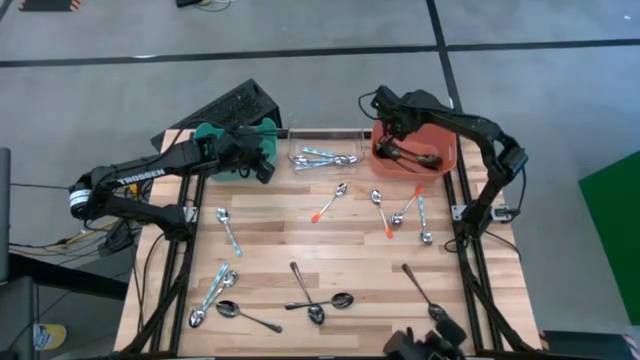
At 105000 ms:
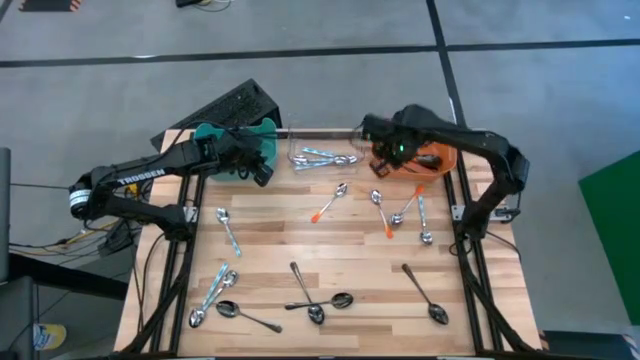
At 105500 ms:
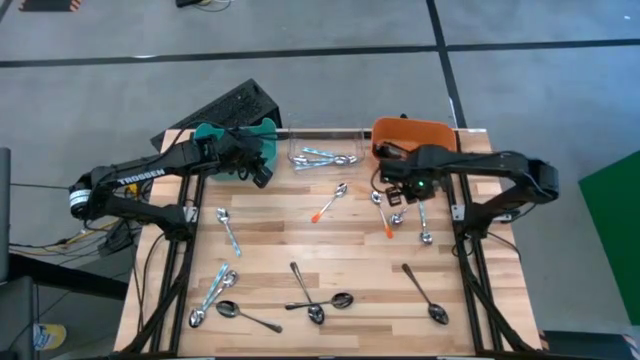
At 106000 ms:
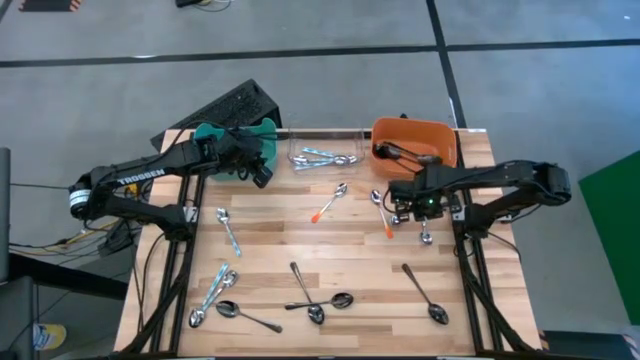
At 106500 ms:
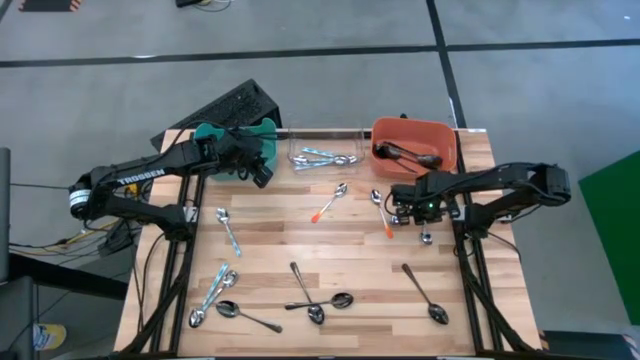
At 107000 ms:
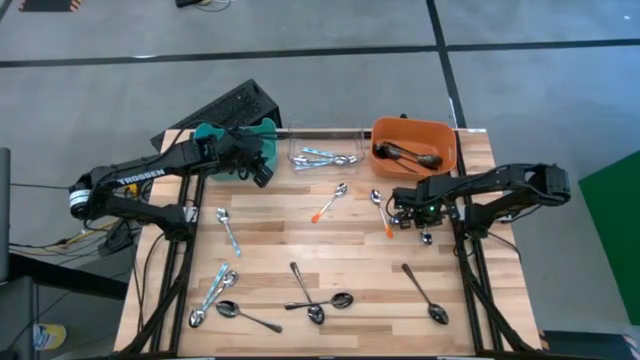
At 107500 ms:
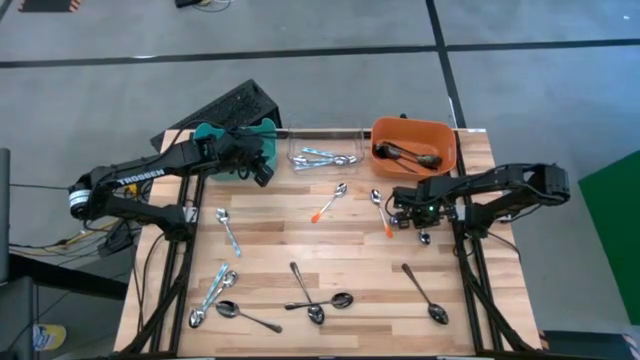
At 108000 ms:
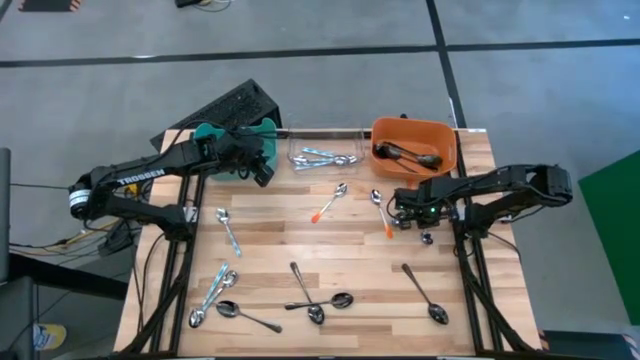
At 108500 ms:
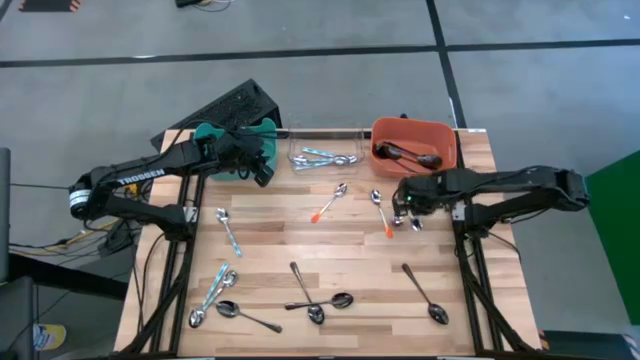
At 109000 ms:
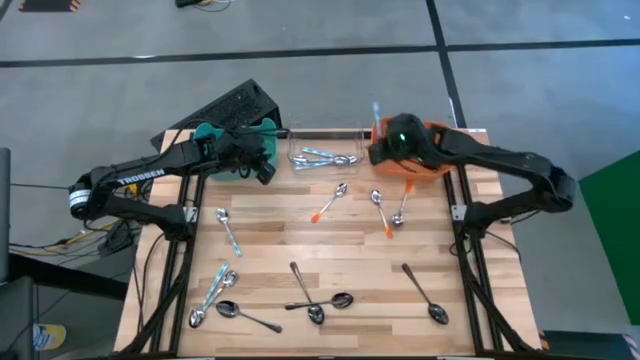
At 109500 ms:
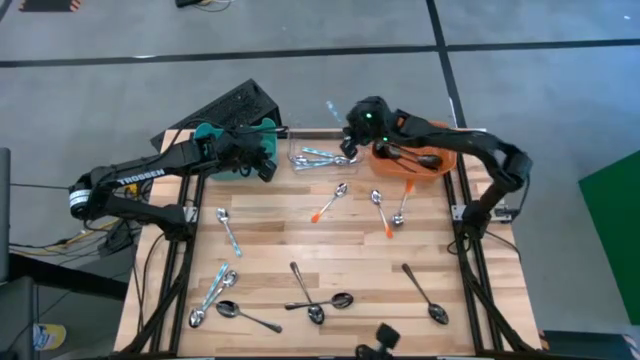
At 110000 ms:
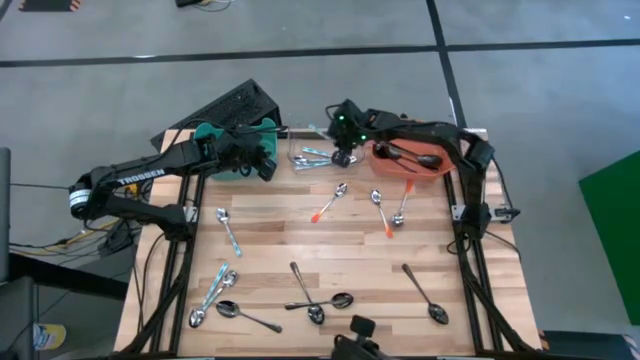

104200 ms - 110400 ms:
Task: Sort silverware by color (type)
Put the blue spoon into the transparent bin

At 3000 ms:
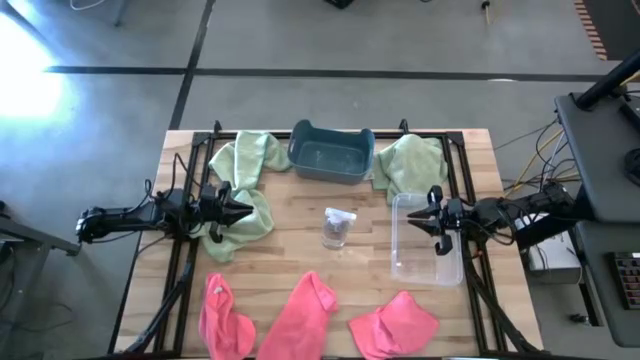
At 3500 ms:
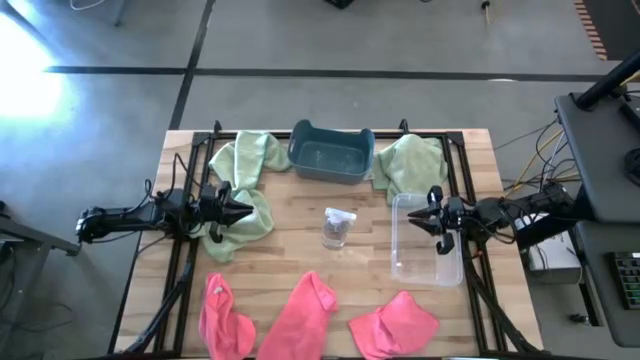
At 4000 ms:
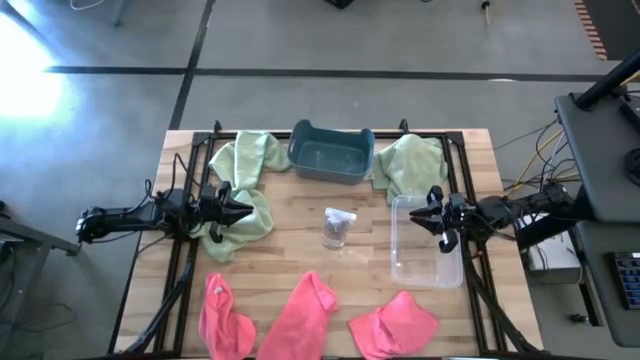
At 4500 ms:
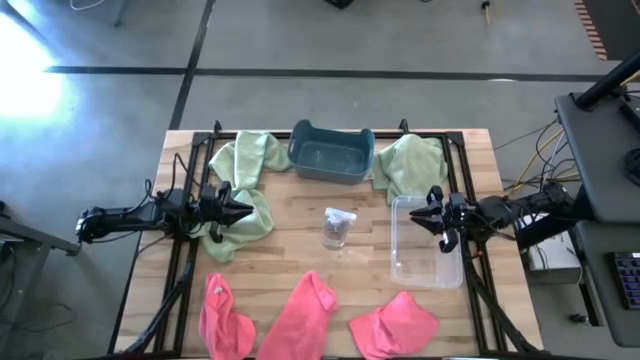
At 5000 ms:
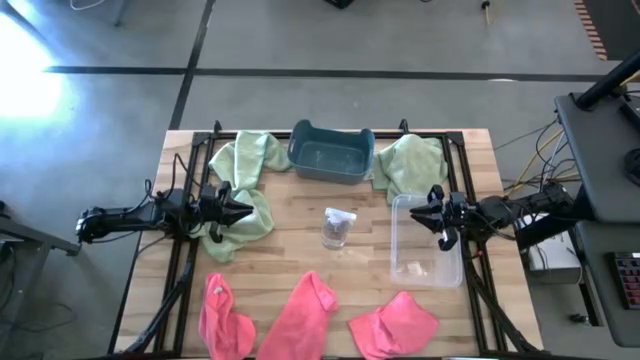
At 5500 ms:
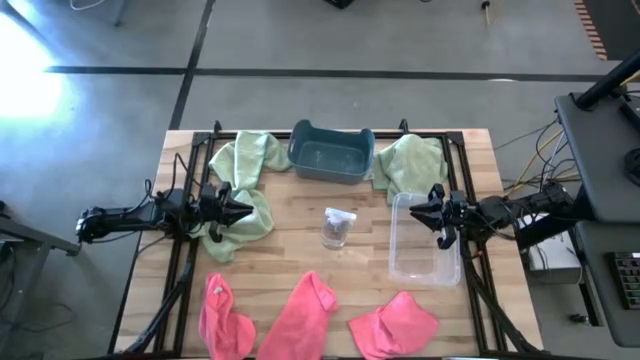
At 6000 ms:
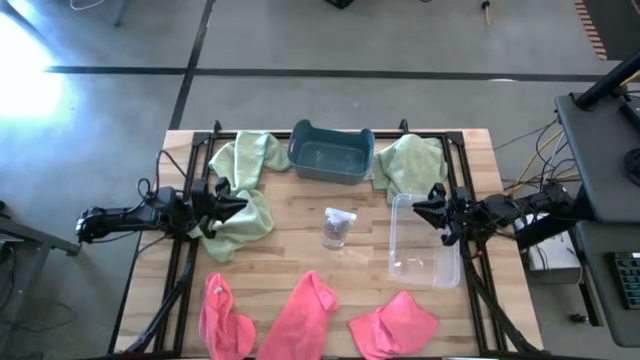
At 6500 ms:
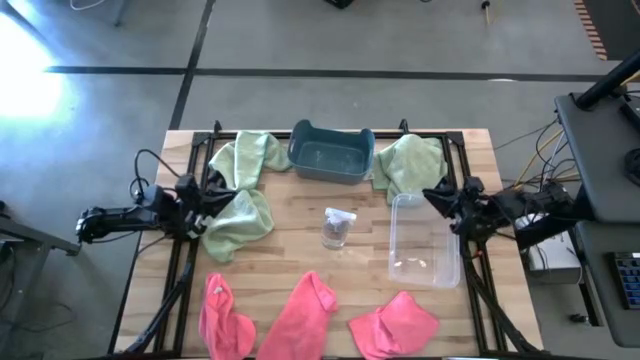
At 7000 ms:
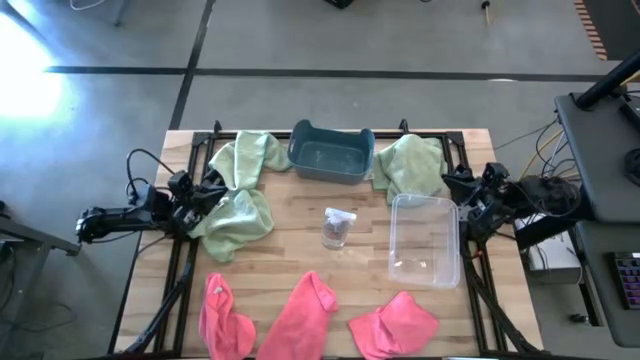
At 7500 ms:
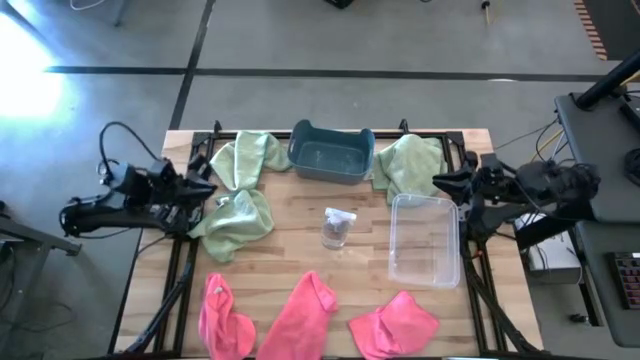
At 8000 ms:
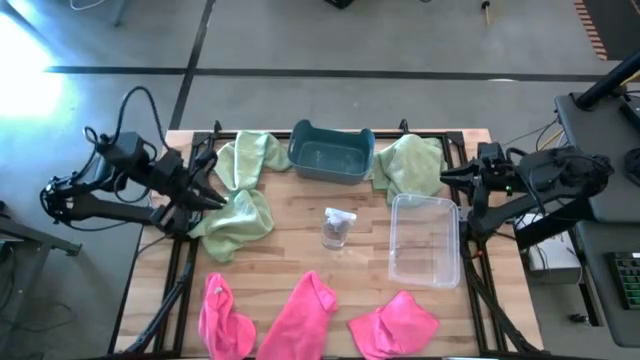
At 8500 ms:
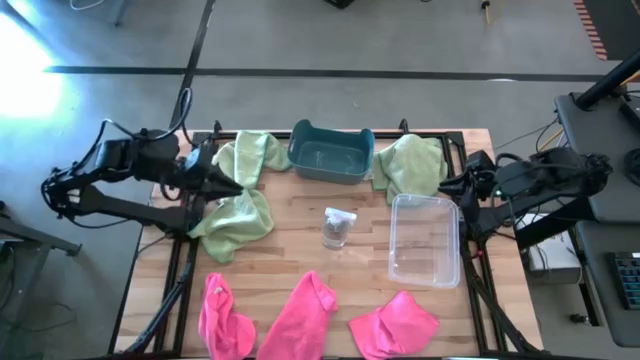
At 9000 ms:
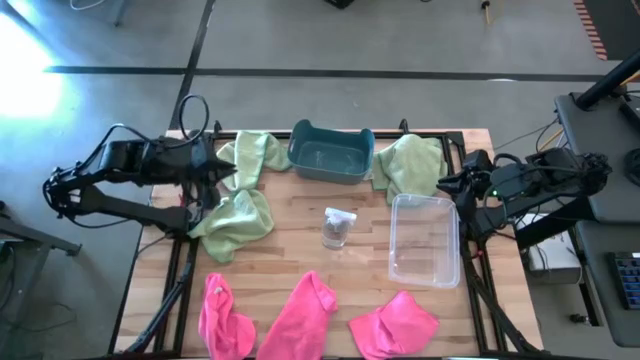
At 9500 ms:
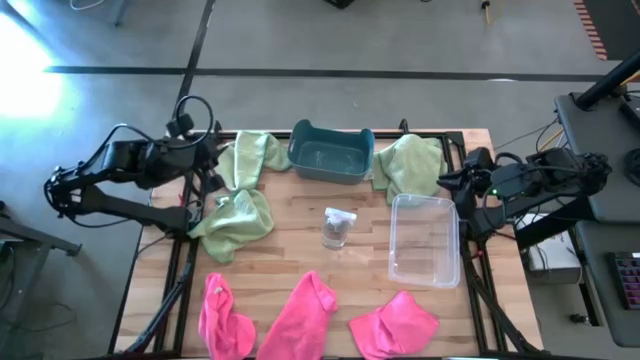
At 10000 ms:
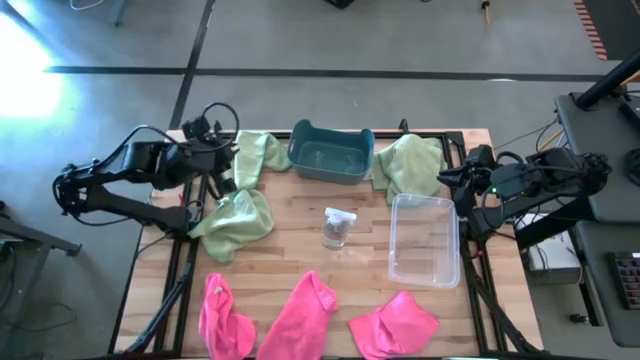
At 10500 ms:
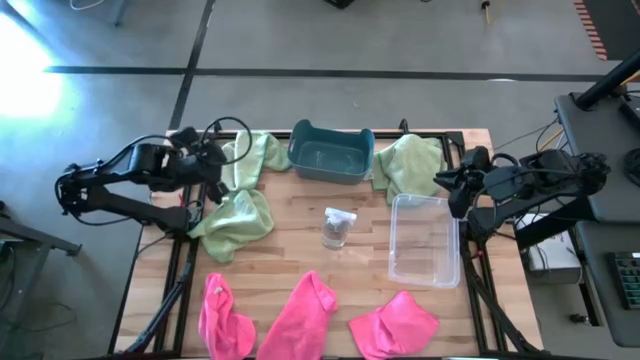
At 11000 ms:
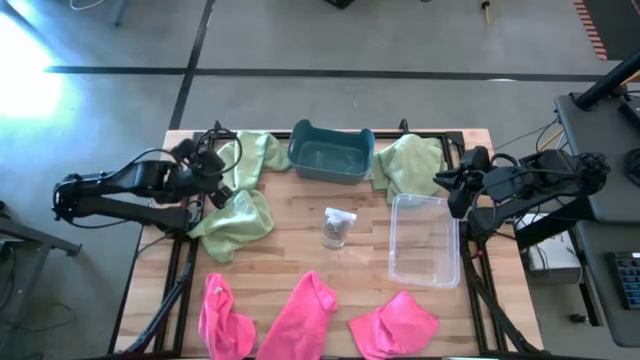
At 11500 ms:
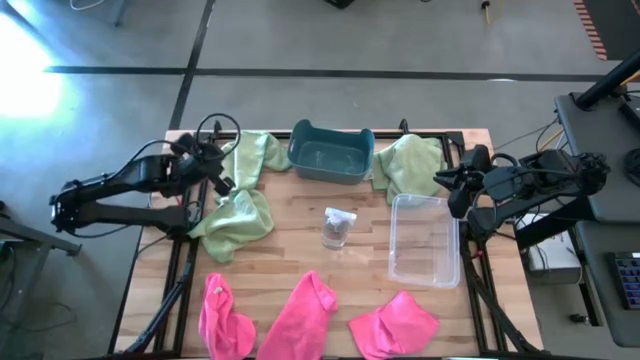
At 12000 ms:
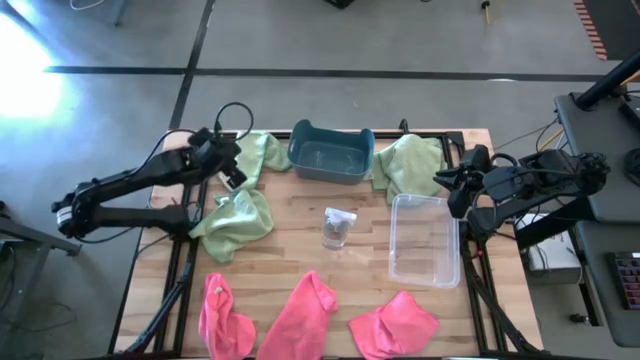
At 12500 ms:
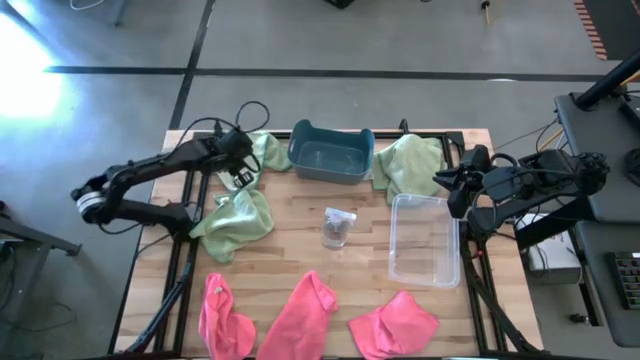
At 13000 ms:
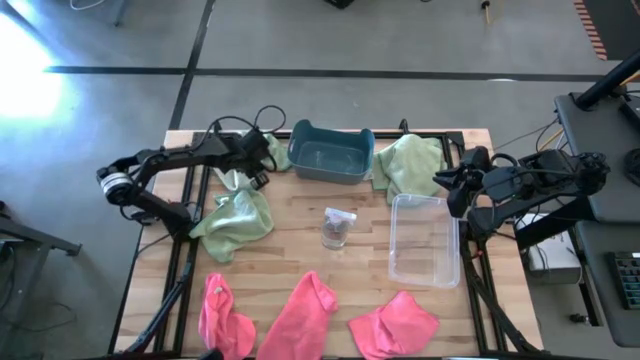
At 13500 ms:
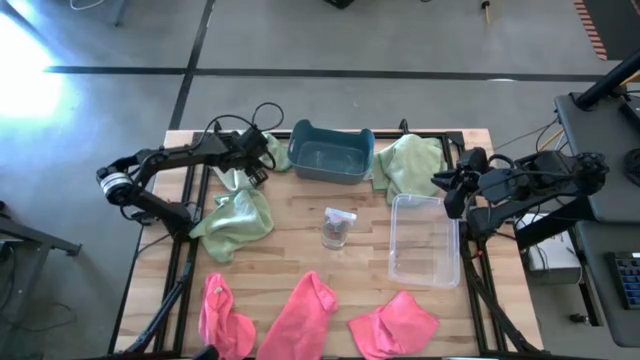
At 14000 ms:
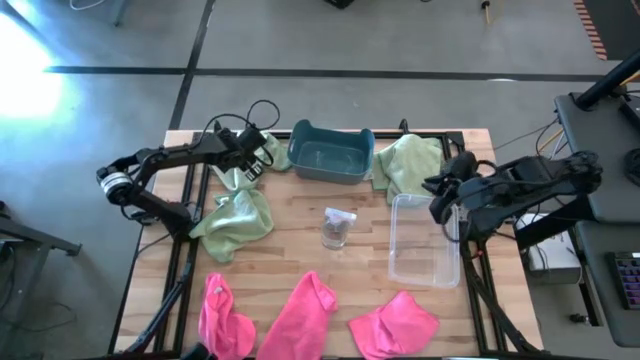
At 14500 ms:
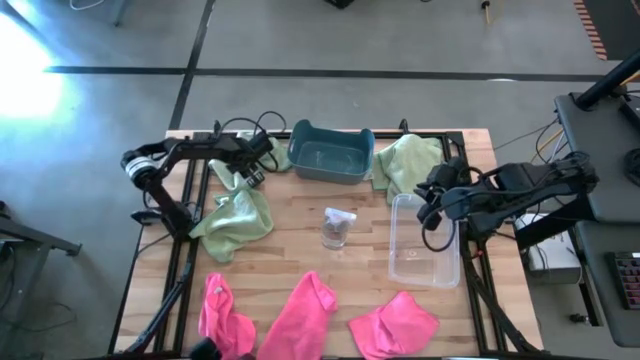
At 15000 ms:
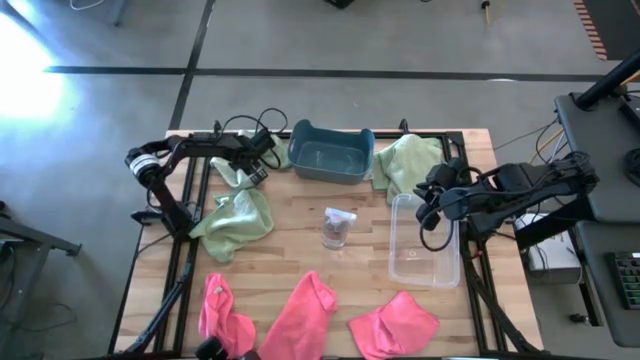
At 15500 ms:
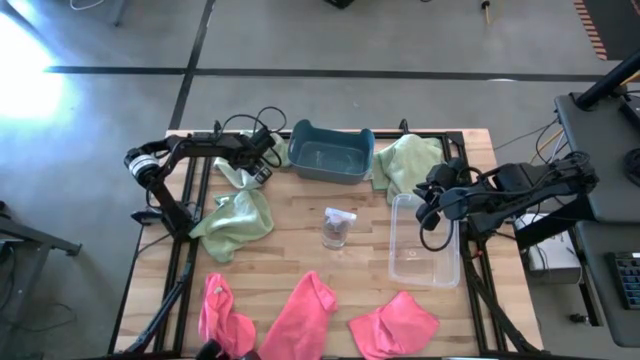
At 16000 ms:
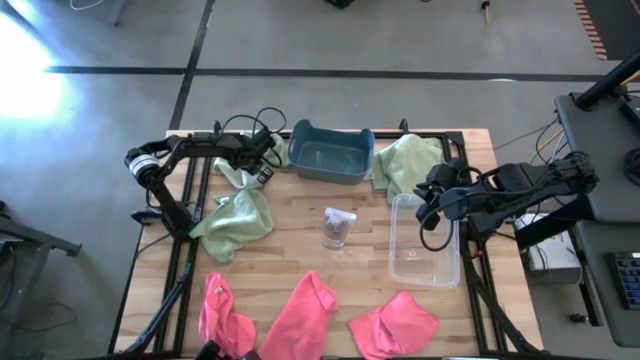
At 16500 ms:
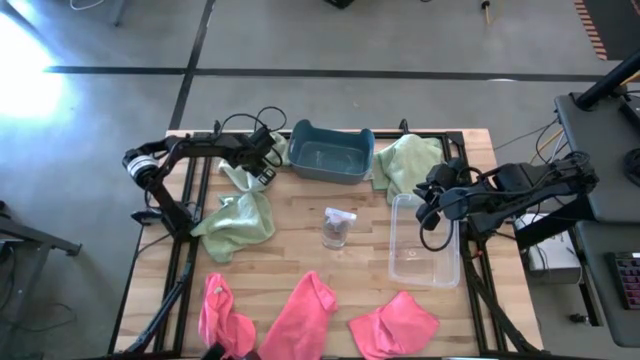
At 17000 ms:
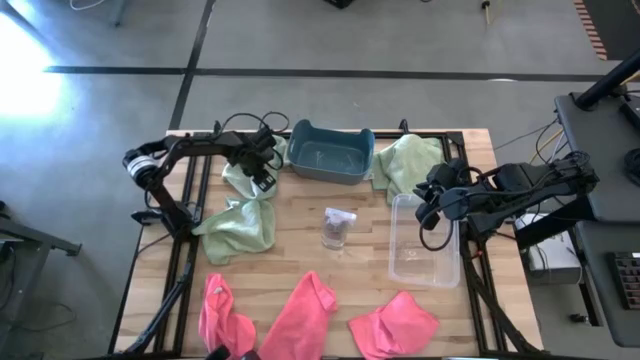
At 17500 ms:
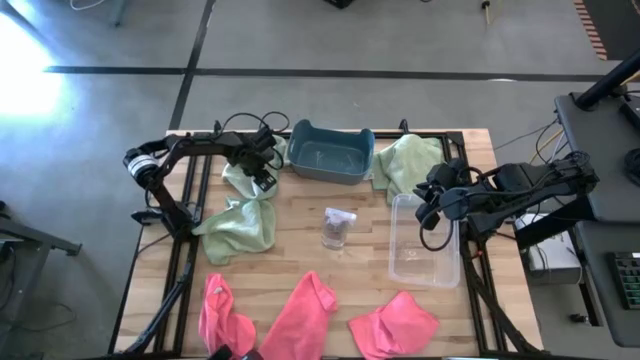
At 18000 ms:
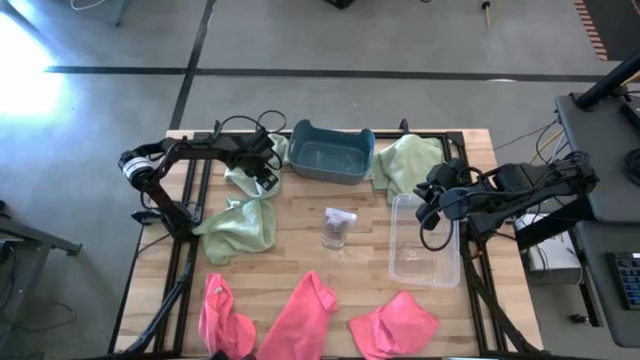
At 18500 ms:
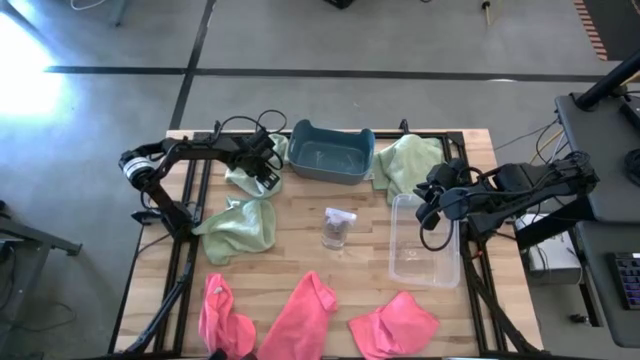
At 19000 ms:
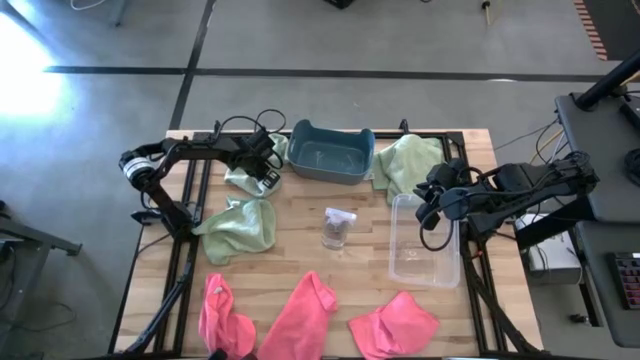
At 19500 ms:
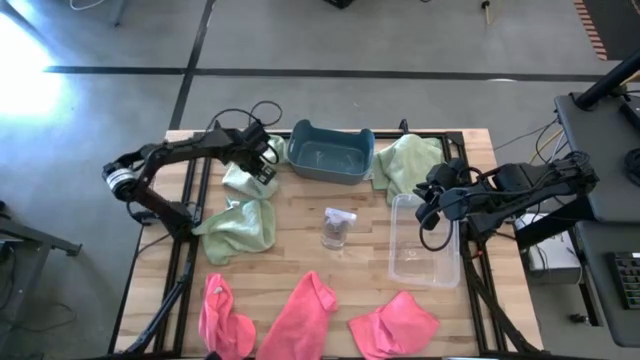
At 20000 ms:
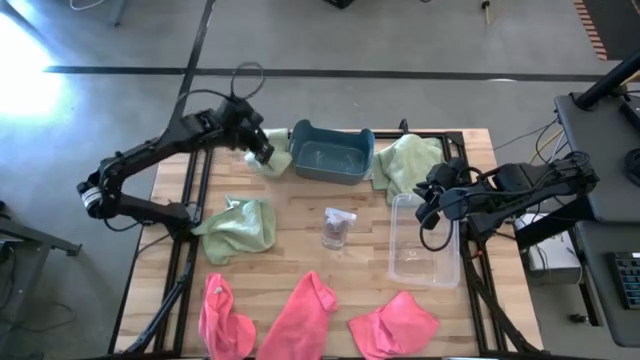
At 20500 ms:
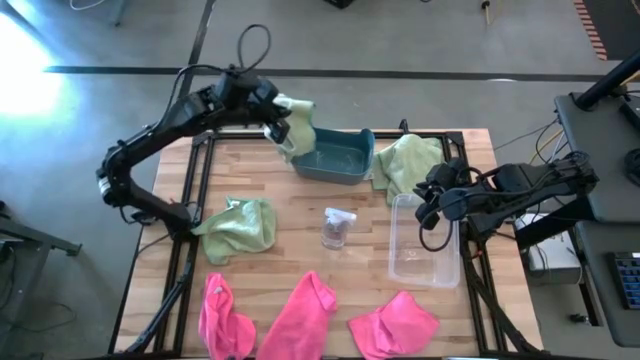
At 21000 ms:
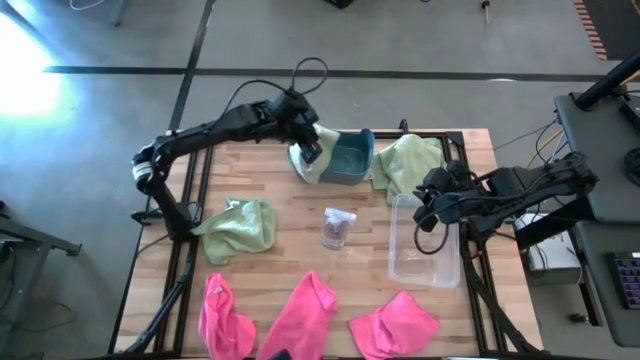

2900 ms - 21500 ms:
Task: Sort microfiber towel by color & place in baskets
Put the green microfiber towel into the blue bin
